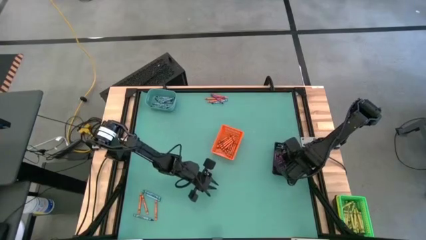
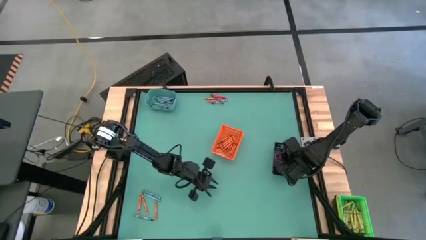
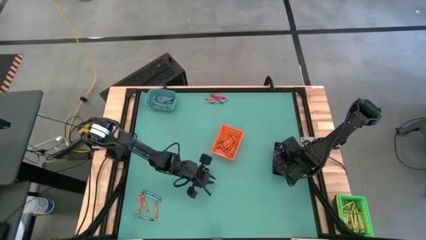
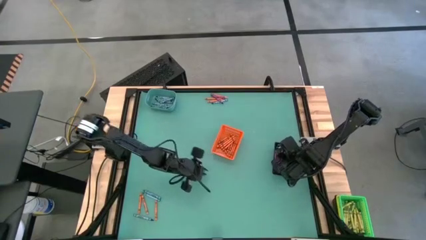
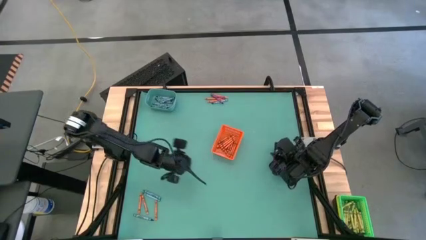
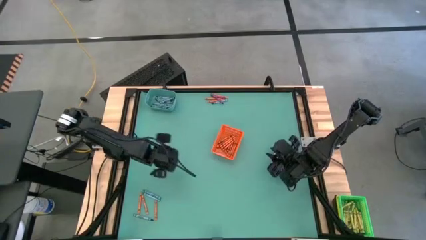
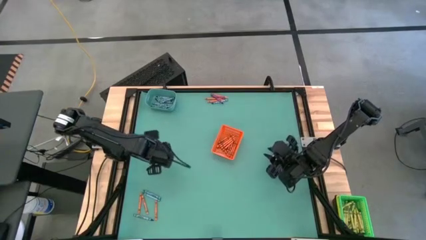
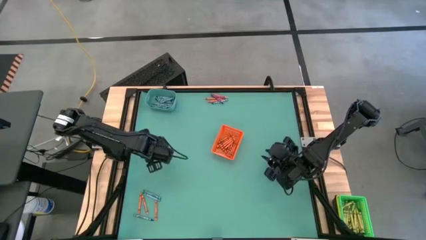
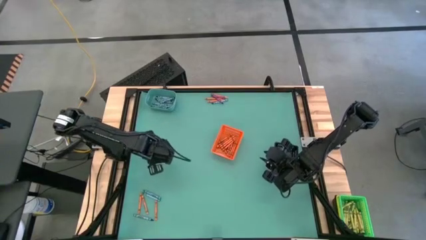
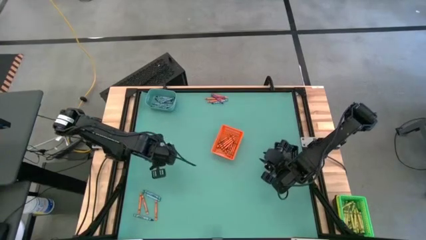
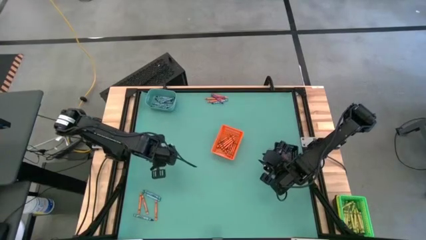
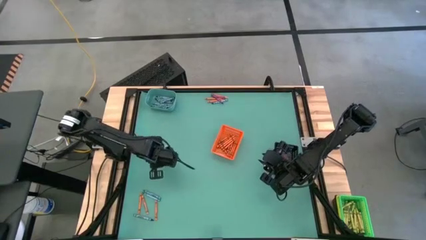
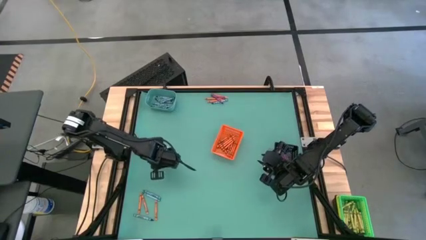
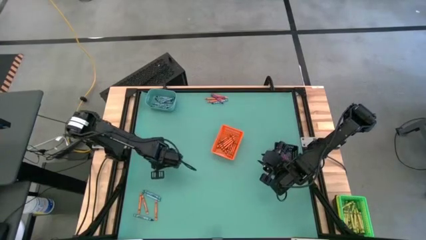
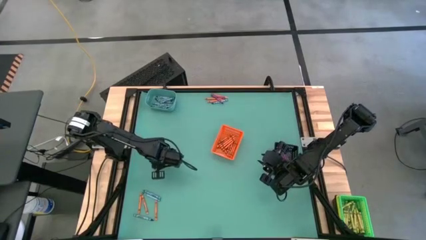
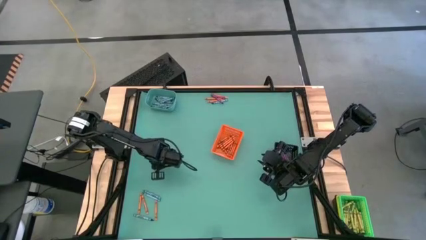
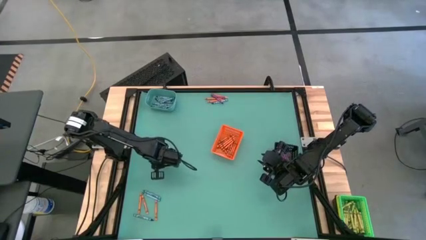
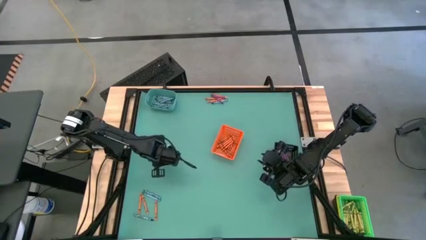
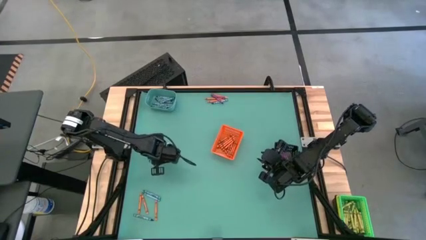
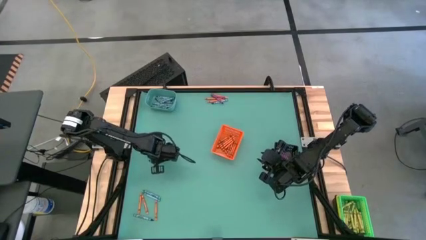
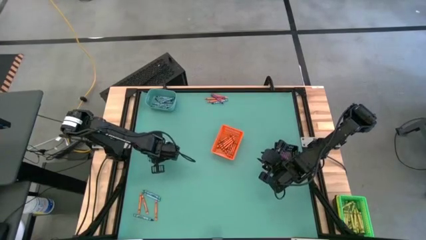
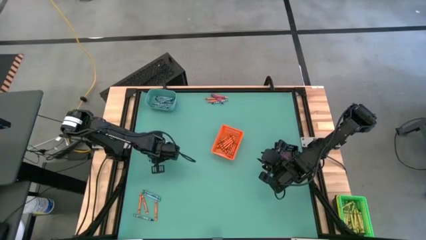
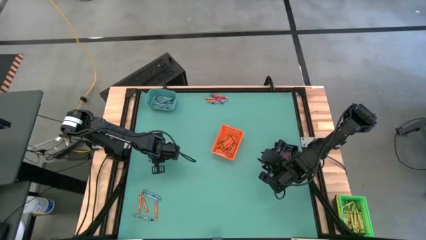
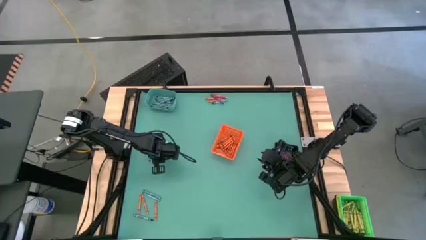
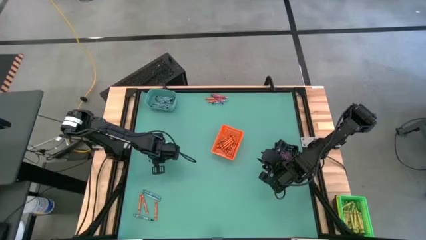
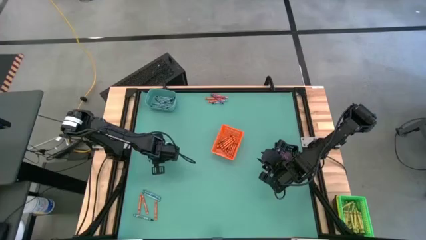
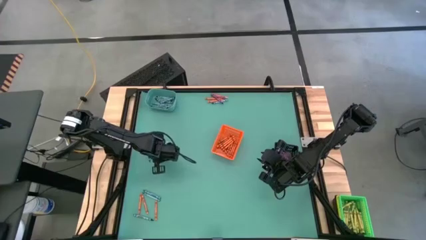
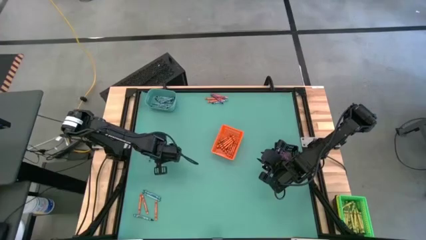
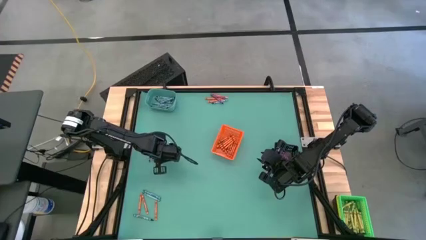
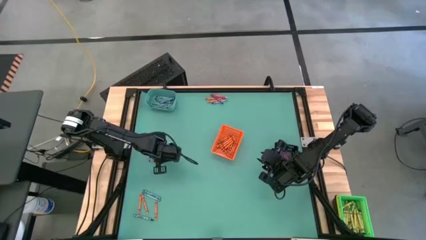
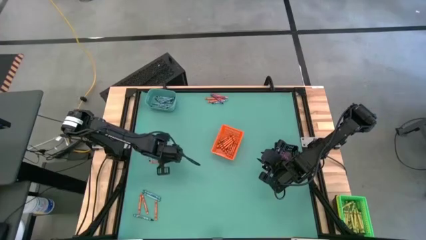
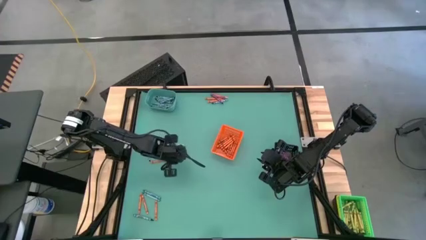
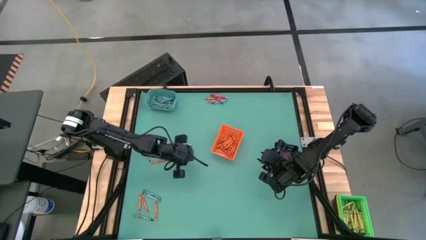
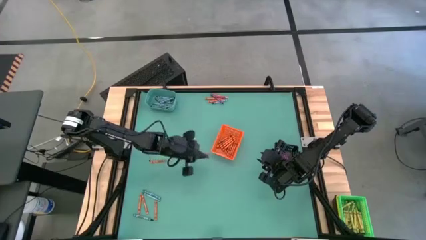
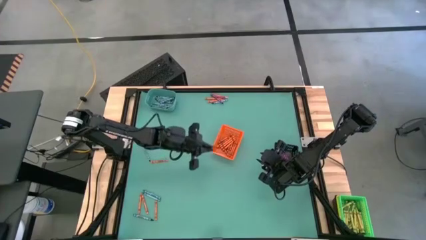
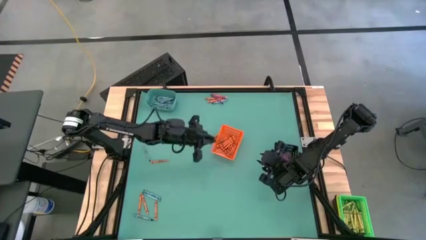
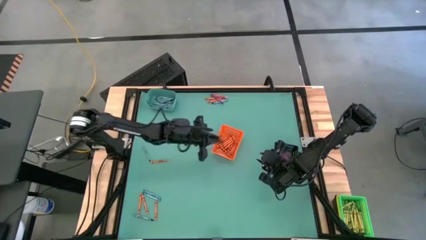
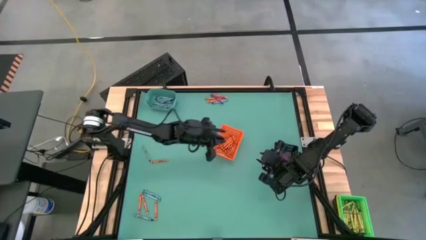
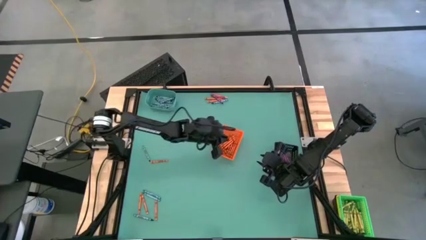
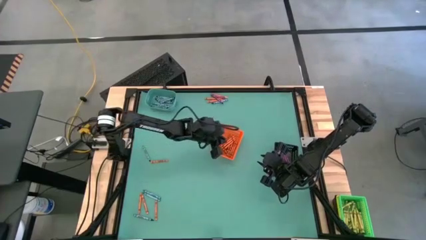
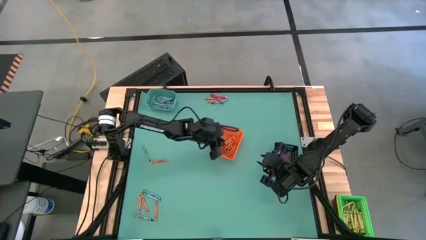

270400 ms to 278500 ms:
Task: Sort crayons
Put the orange crayon into the orange bin

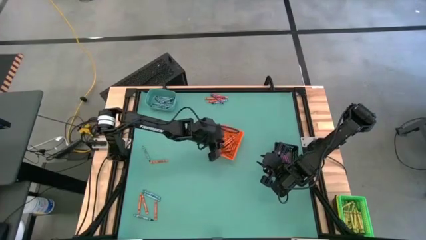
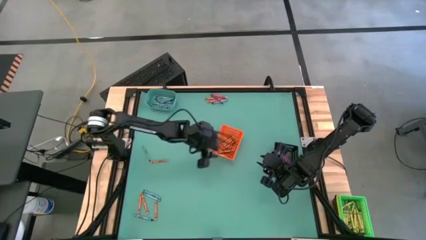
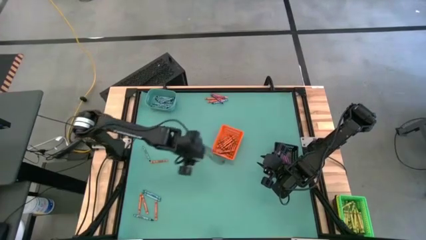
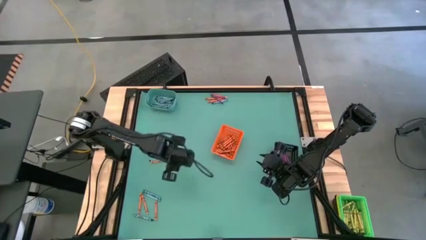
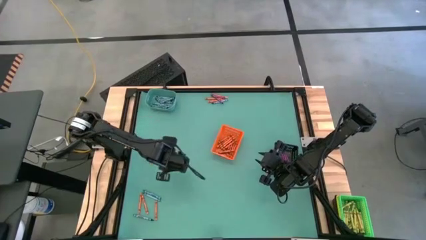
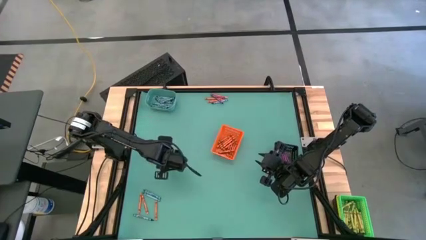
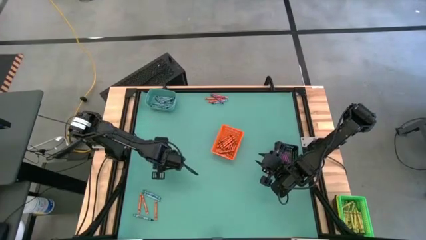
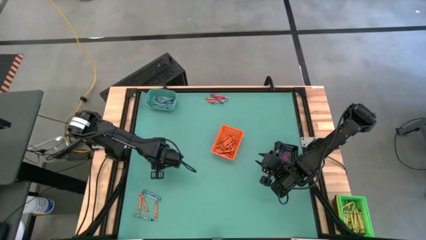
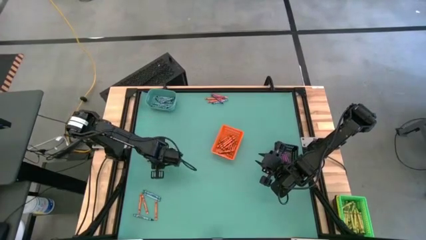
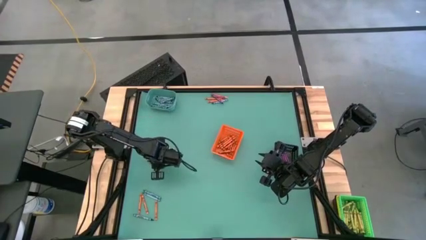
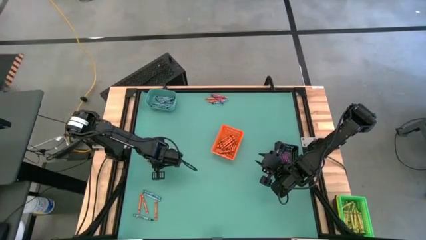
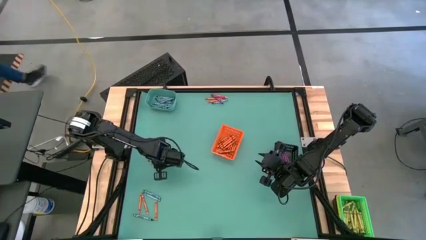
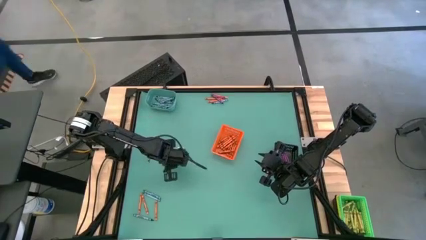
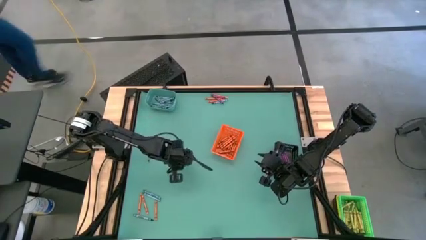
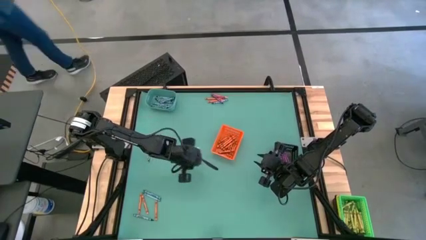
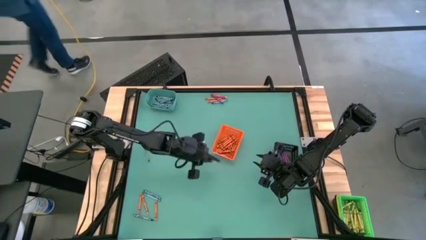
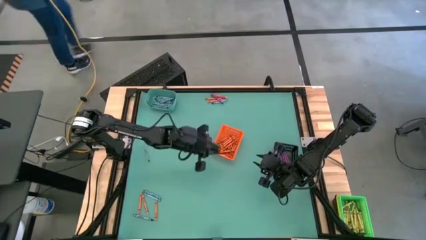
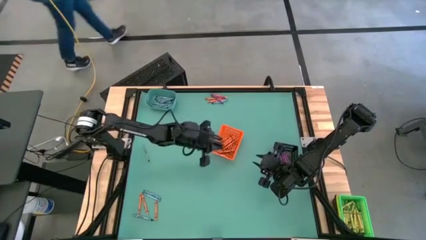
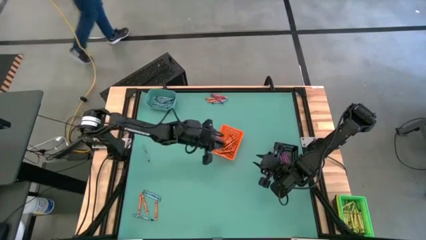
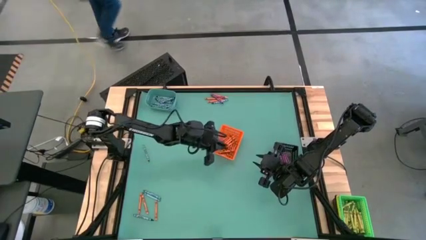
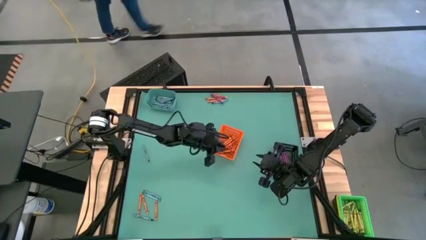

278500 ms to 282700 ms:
Put the orange crayon into the orange bin
